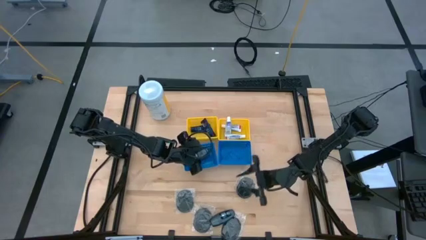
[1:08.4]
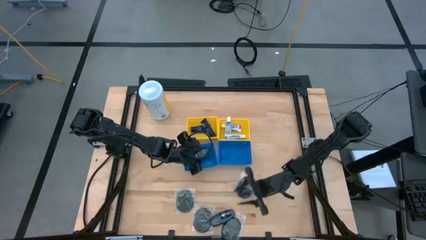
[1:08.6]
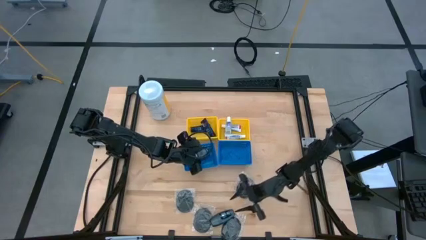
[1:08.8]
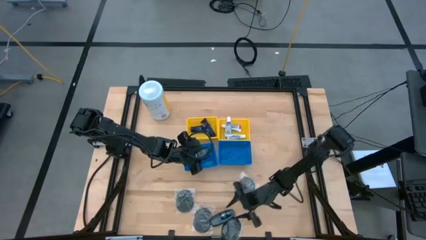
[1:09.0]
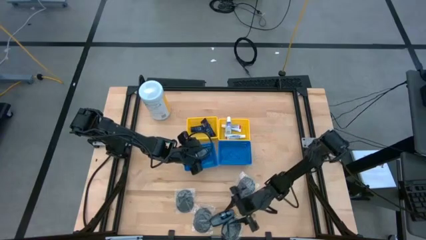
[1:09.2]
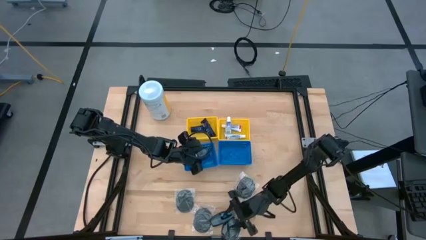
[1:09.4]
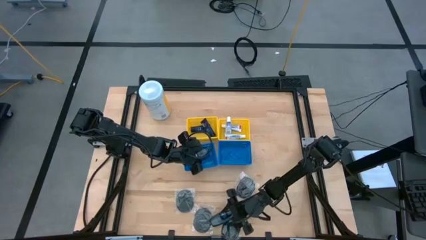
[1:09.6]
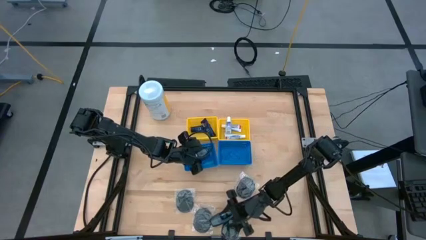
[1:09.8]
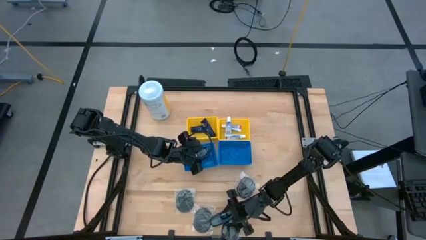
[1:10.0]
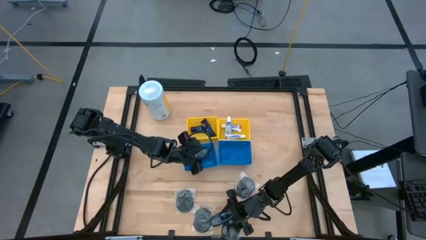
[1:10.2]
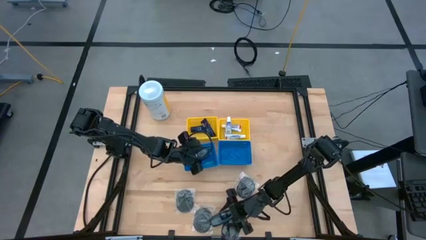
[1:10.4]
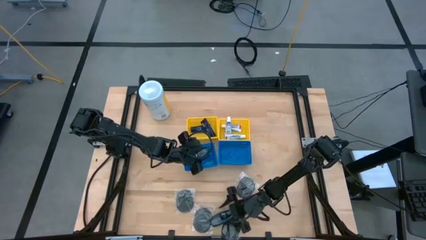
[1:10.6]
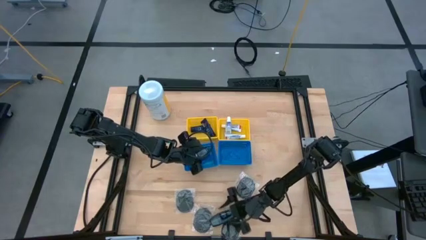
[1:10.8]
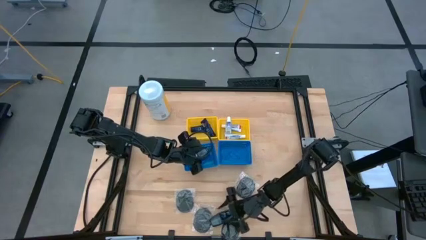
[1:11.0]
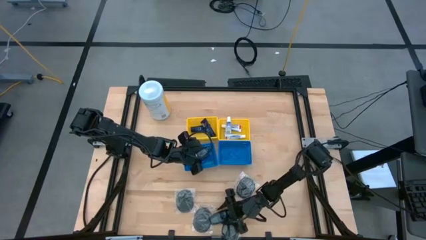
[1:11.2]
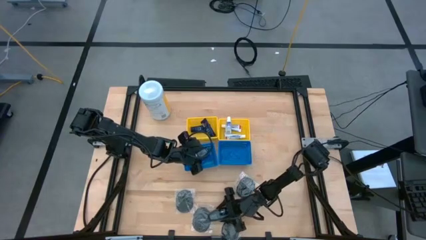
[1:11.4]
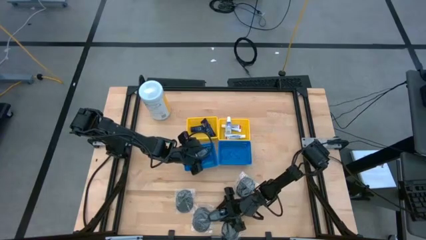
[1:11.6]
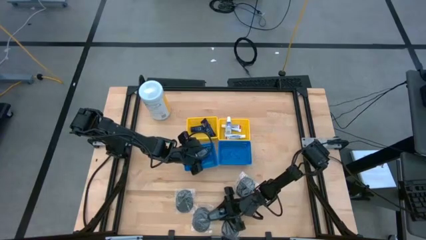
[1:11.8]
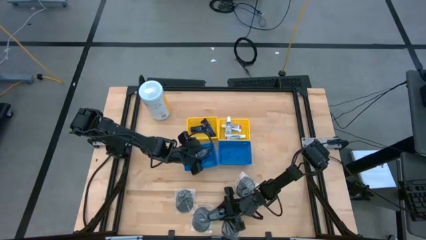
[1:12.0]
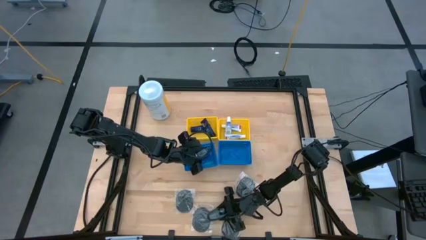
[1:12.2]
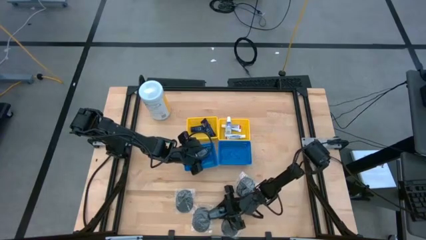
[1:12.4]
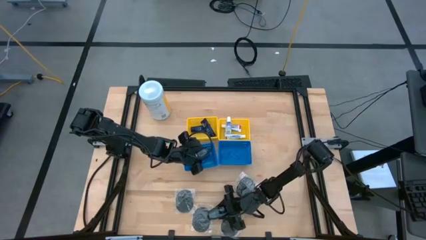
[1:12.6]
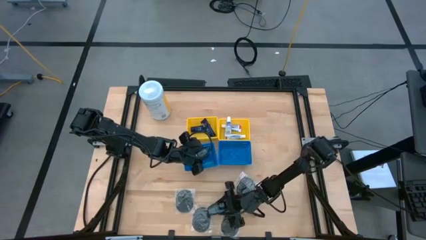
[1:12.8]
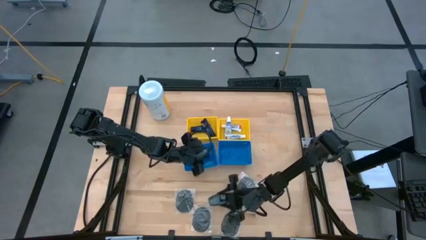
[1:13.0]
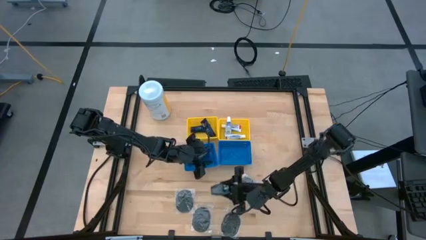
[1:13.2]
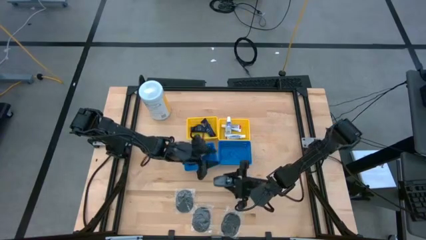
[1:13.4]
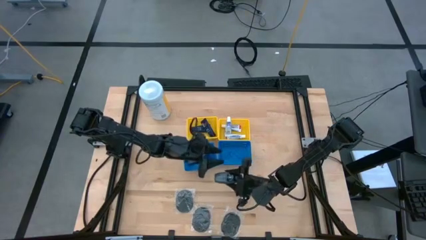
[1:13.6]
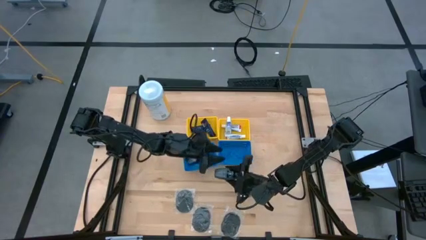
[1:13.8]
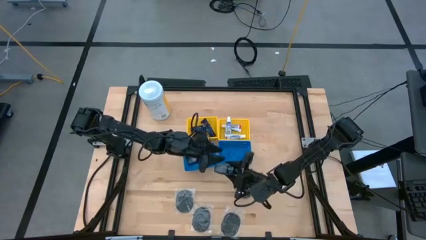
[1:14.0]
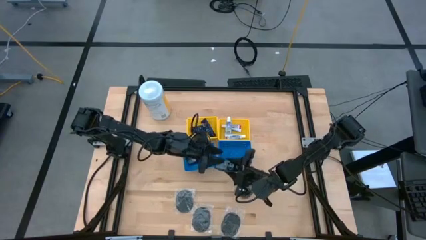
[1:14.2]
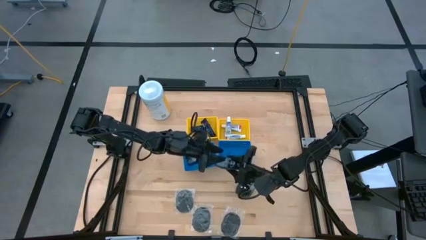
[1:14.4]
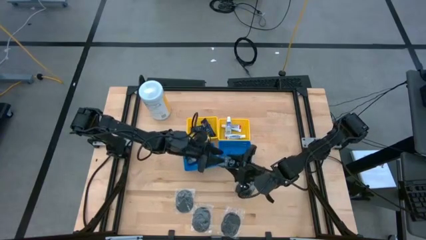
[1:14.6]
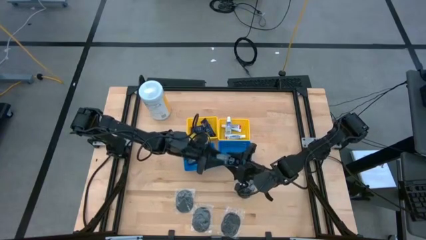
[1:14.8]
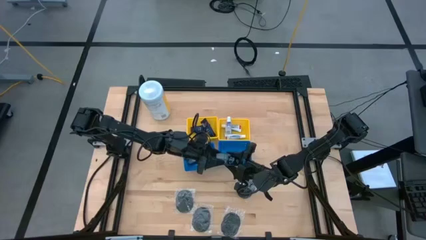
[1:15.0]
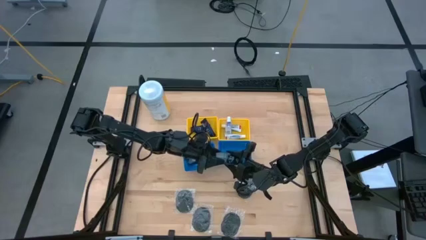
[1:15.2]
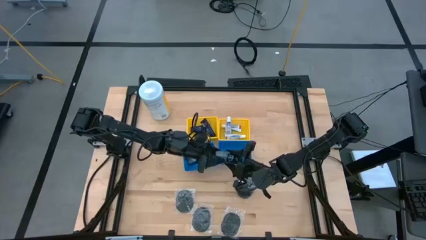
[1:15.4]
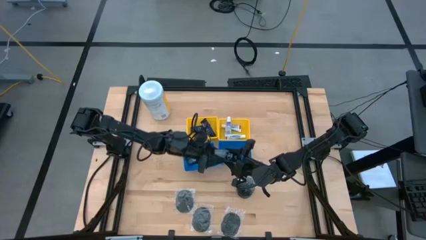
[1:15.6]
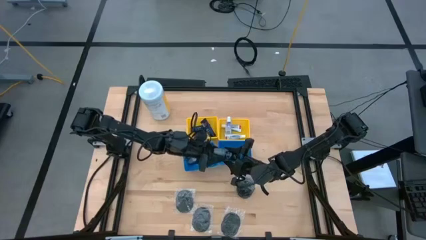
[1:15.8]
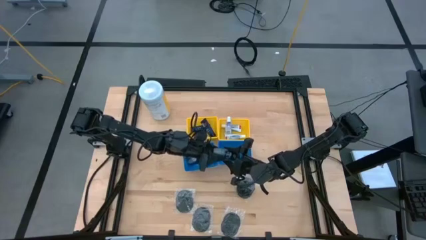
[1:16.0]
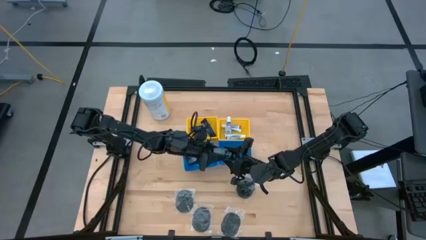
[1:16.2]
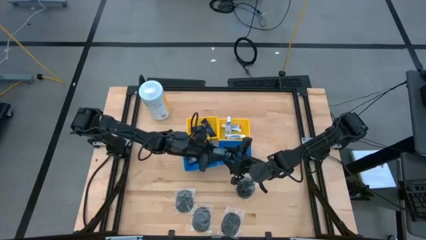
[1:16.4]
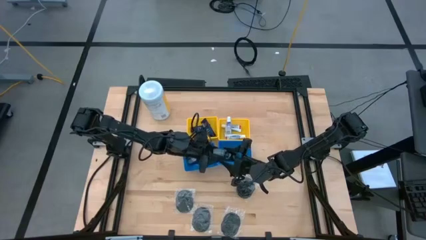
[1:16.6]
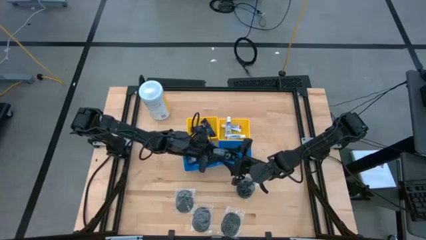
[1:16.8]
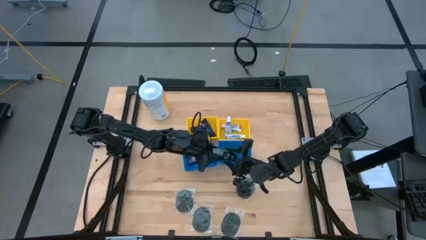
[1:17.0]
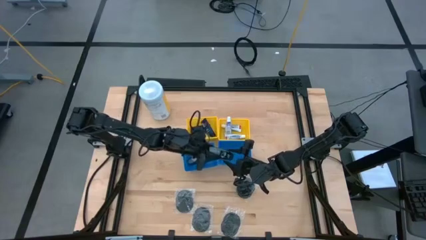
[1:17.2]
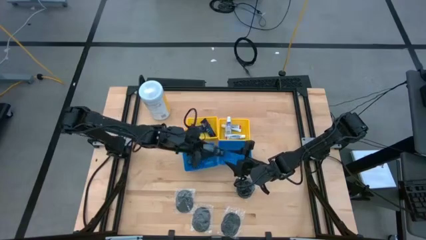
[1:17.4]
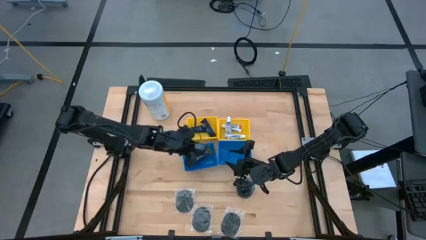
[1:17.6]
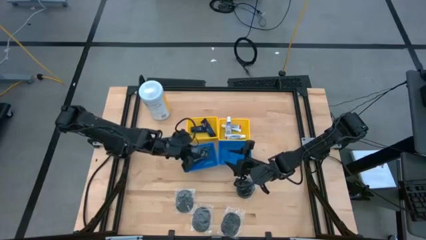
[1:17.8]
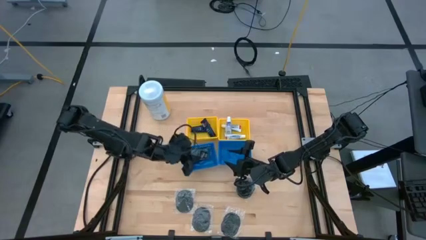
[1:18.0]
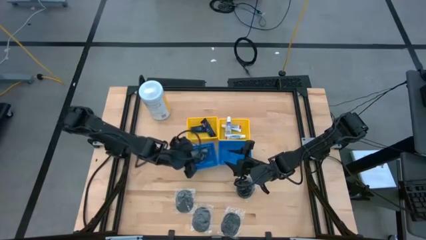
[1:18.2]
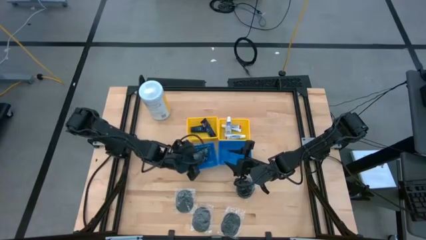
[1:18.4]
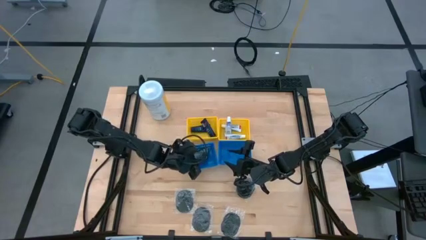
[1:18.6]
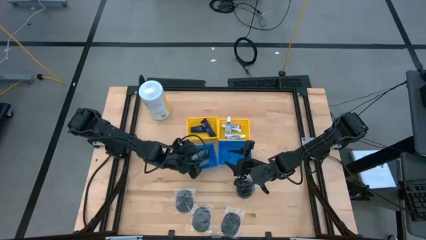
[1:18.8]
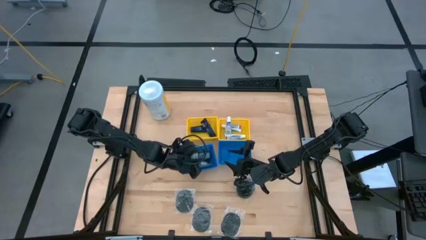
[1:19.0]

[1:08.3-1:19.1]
Task: Pick & Place Travel size toiletries
Put the deodorant into the left blue bin

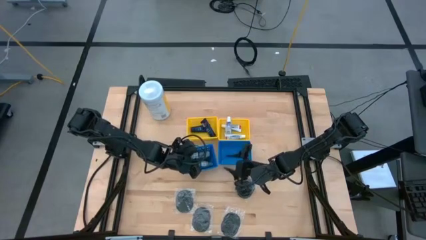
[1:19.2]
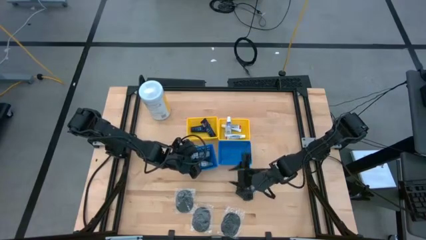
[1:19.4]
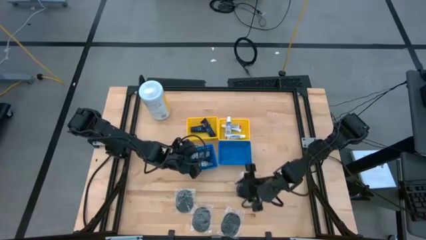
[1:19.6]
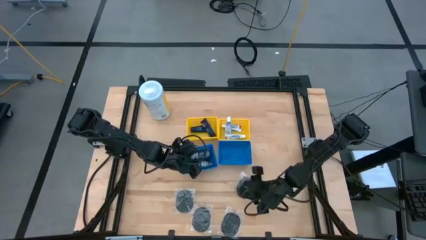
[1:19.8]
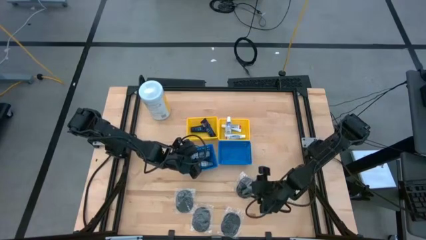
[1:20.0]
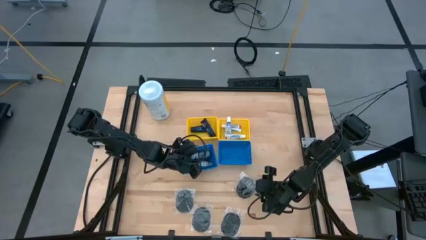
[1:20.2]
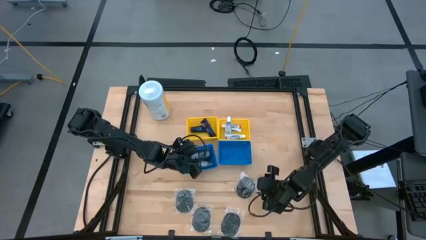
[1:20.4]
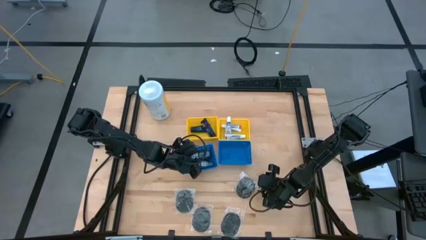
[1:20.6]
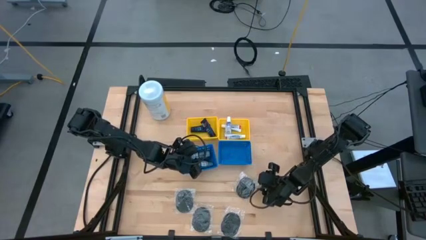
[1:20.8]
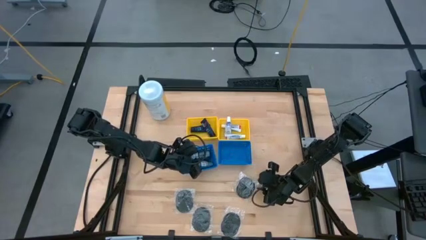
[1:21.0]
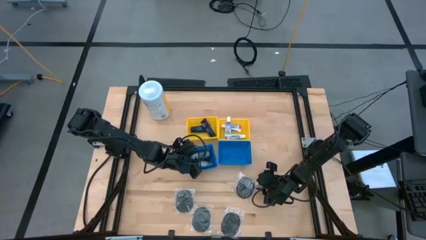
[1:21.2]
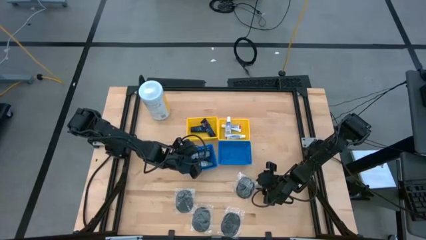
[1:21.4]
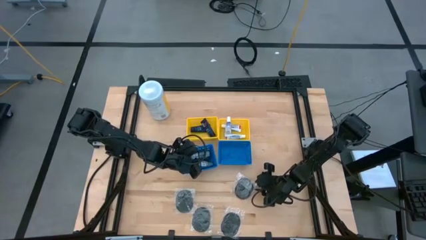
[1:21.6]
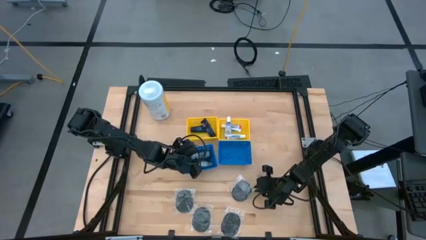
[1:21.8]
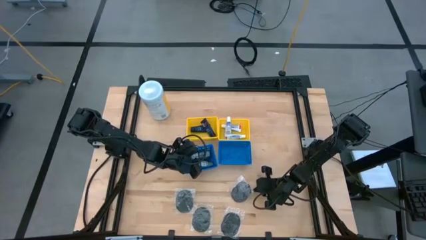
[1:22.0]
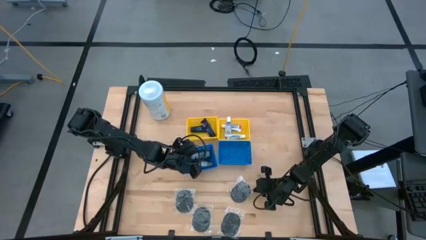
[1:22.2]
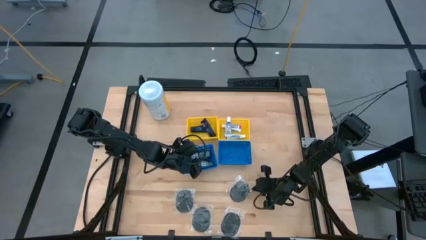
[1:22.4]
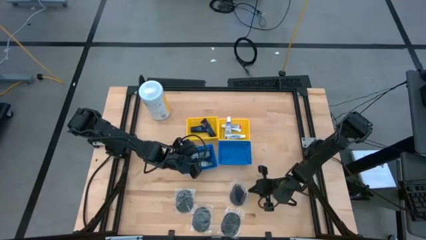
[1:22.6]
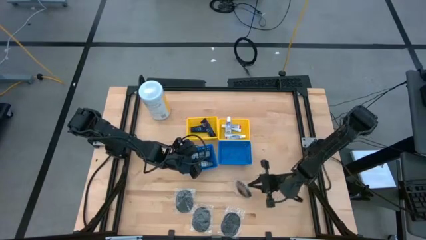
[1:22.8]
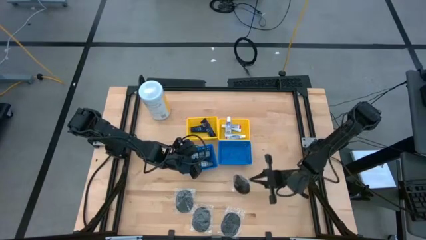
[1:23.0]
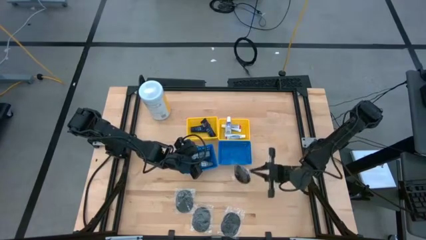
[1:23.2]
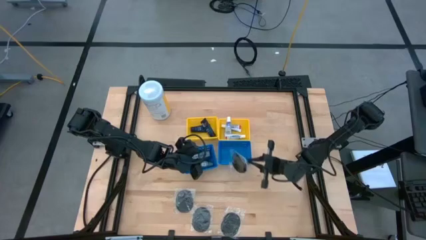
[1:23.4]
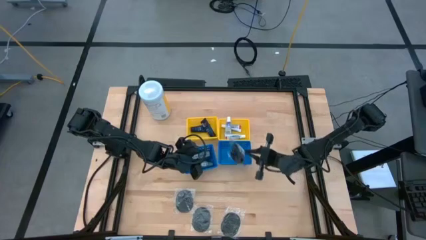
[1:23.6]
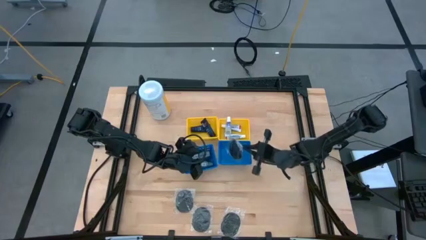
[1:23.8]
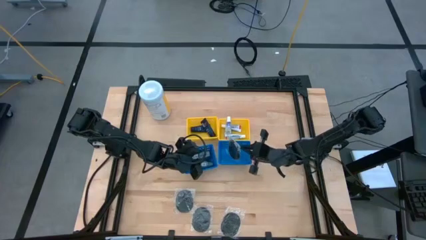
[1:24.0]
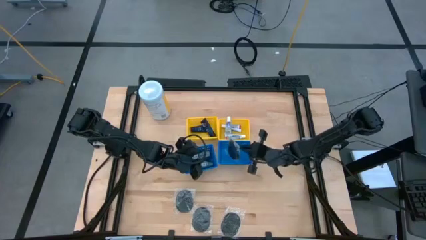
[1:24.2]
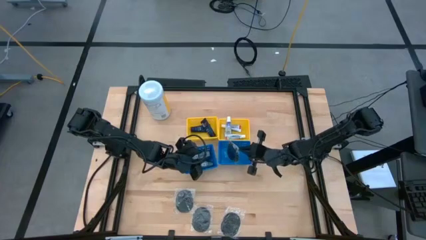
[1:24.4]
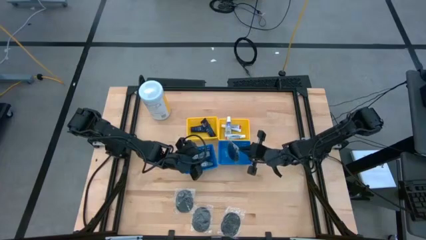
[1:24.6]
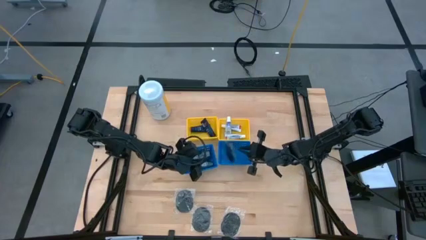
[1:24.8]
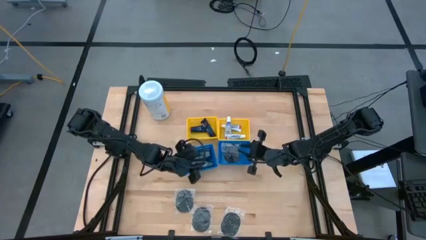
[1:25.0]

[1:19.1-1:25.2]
Put the top right hairbrush into the right blue bin
